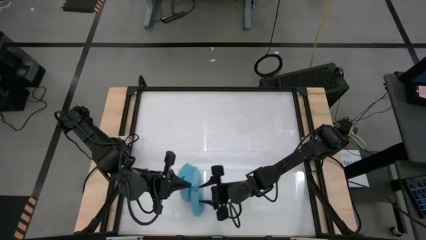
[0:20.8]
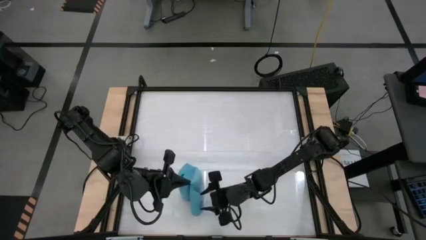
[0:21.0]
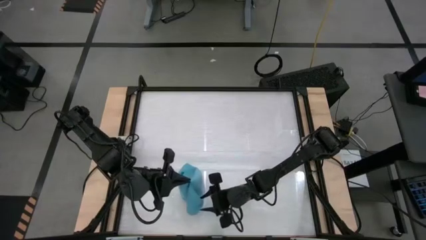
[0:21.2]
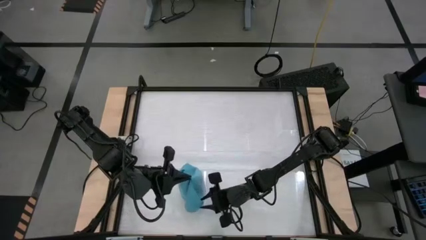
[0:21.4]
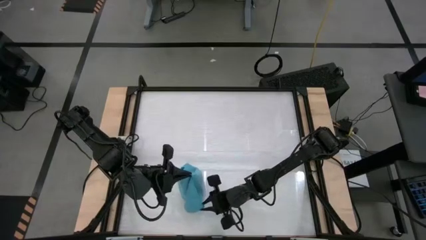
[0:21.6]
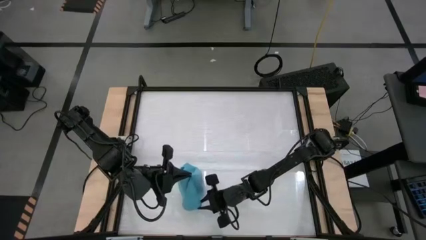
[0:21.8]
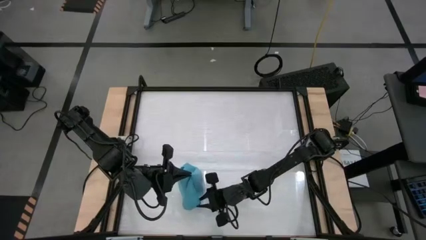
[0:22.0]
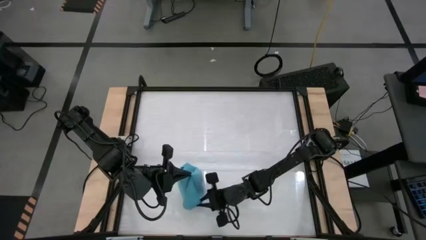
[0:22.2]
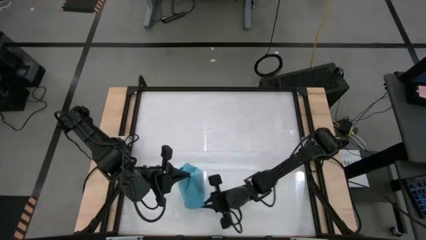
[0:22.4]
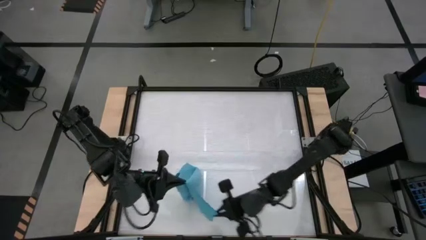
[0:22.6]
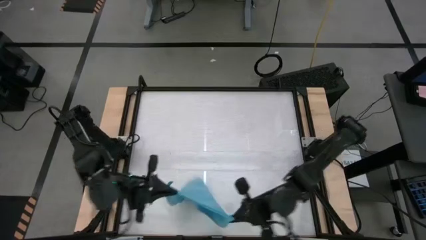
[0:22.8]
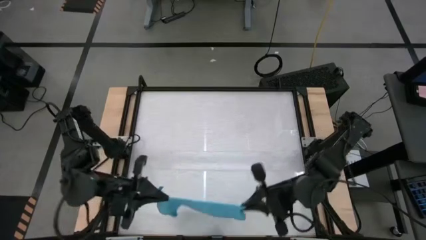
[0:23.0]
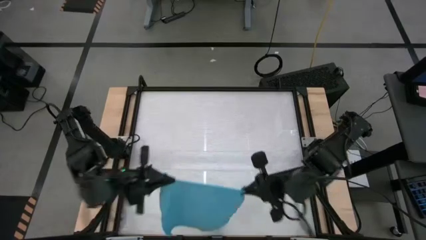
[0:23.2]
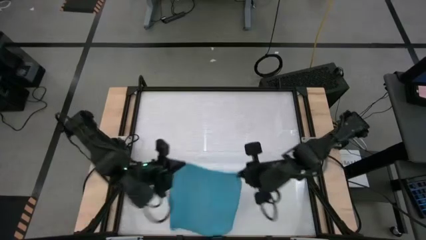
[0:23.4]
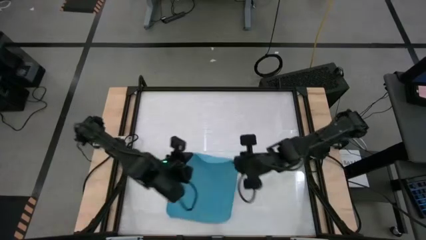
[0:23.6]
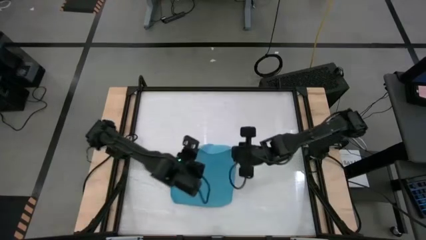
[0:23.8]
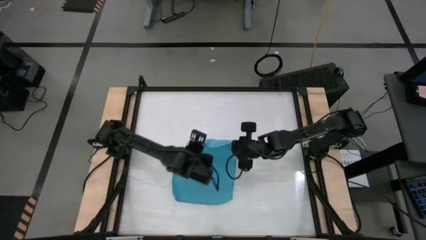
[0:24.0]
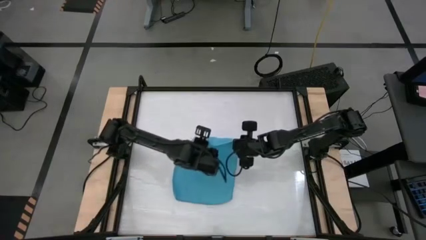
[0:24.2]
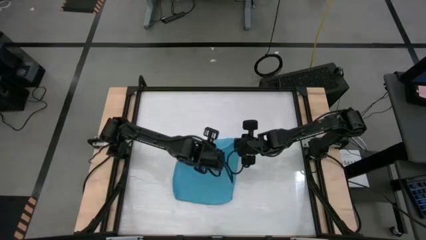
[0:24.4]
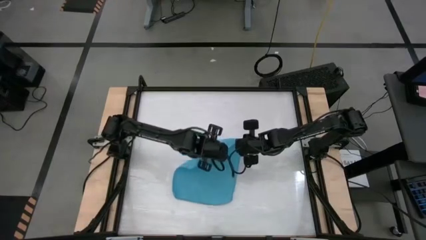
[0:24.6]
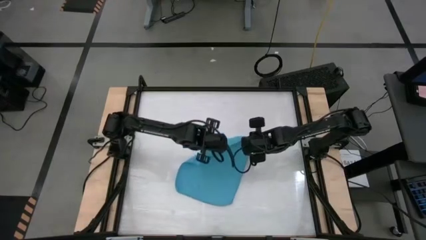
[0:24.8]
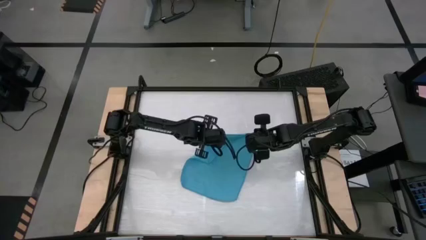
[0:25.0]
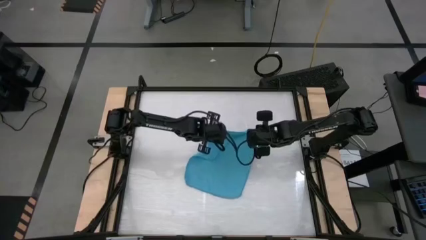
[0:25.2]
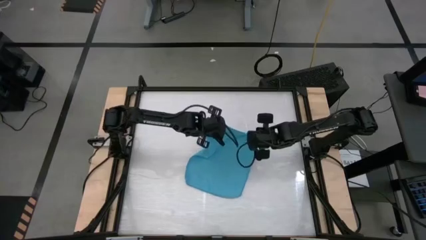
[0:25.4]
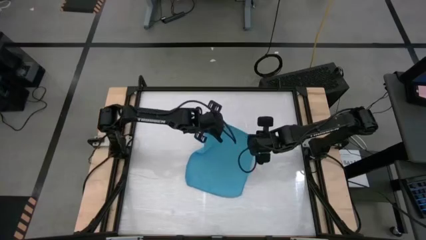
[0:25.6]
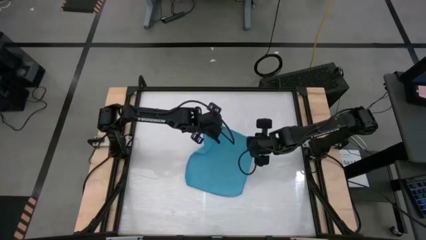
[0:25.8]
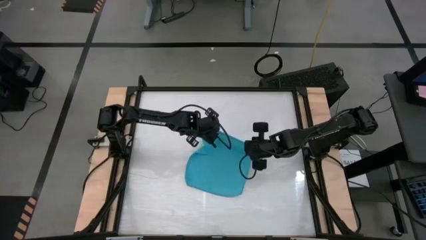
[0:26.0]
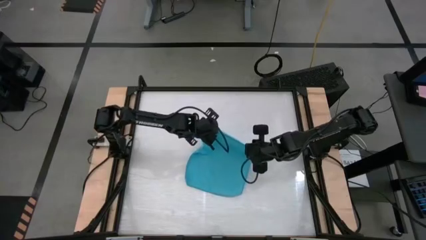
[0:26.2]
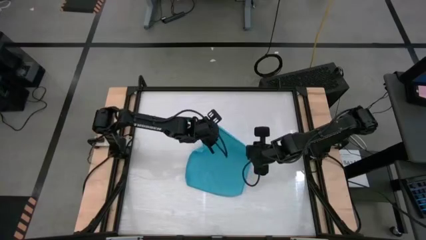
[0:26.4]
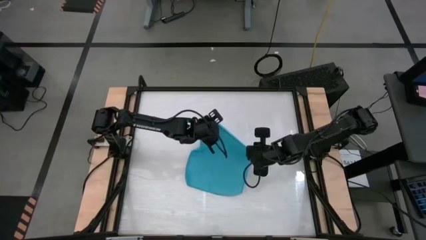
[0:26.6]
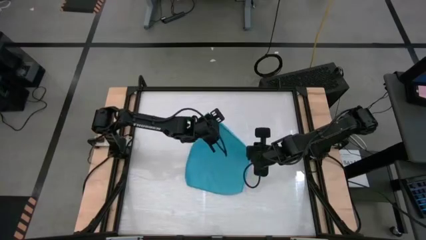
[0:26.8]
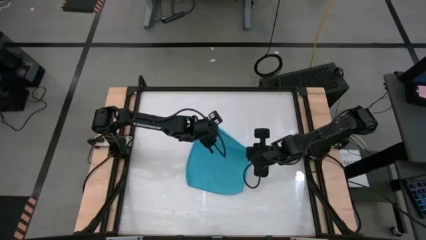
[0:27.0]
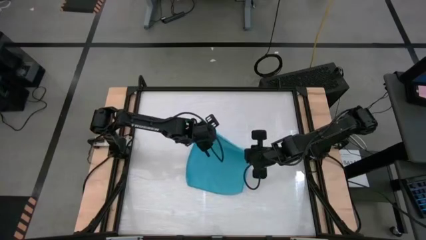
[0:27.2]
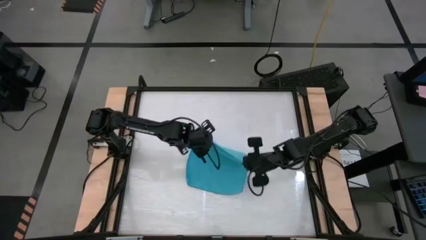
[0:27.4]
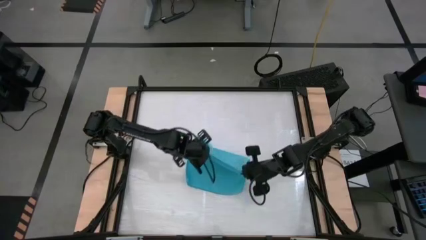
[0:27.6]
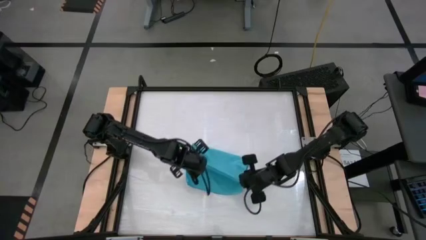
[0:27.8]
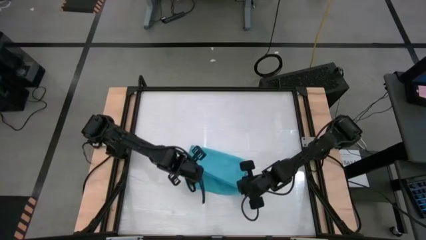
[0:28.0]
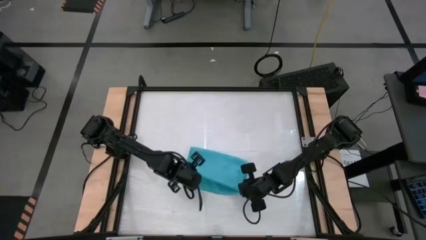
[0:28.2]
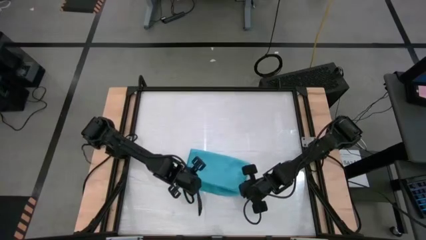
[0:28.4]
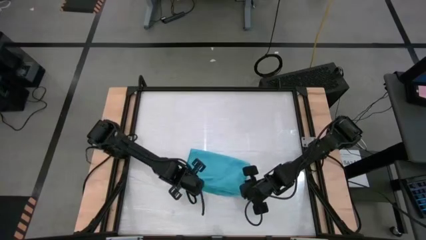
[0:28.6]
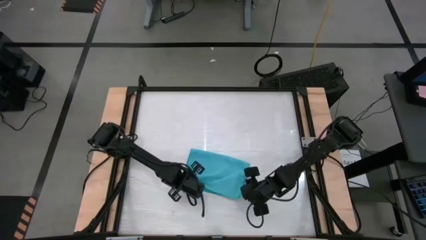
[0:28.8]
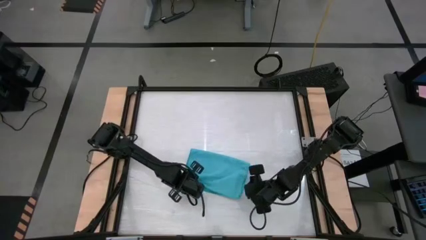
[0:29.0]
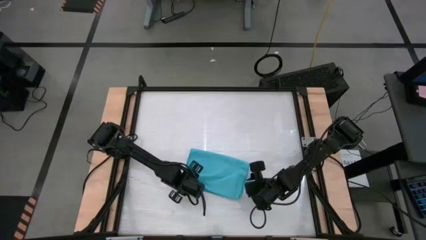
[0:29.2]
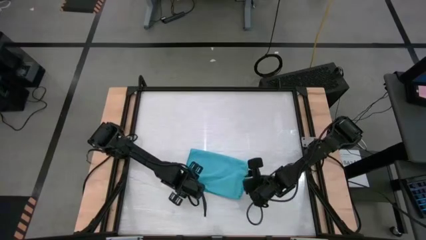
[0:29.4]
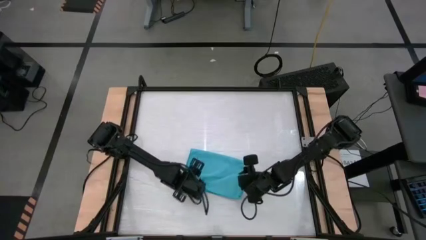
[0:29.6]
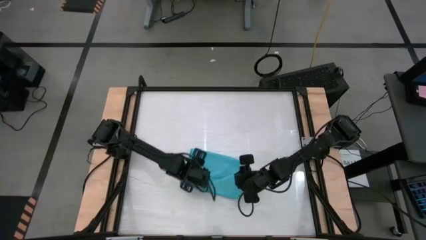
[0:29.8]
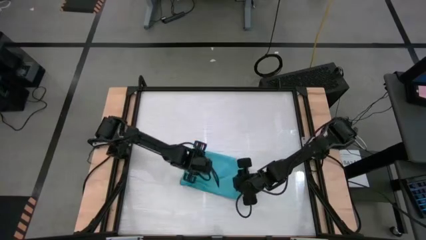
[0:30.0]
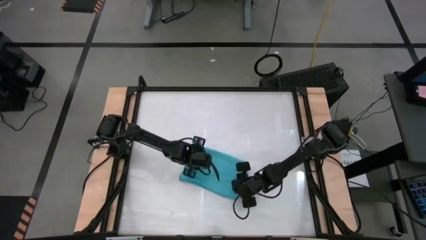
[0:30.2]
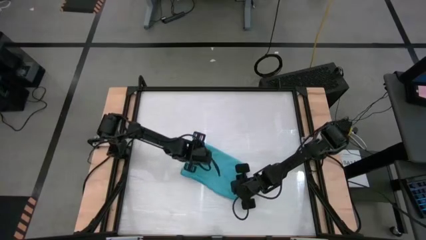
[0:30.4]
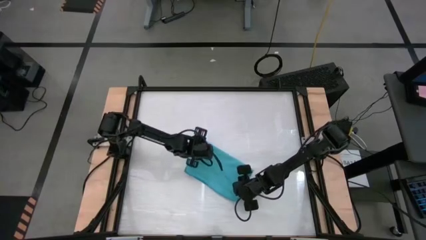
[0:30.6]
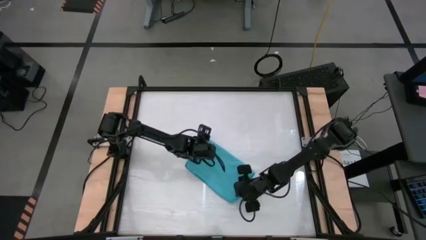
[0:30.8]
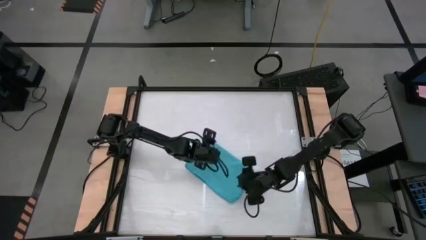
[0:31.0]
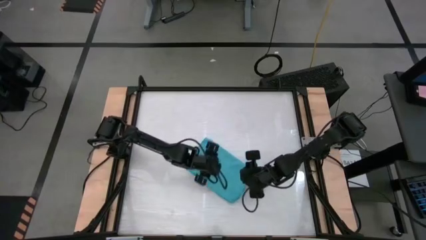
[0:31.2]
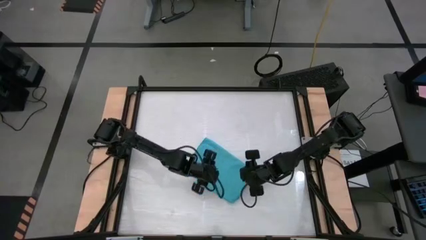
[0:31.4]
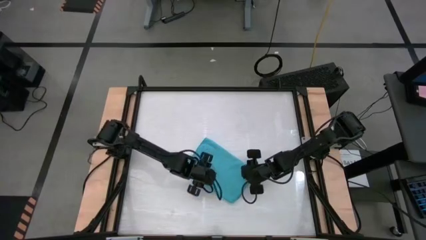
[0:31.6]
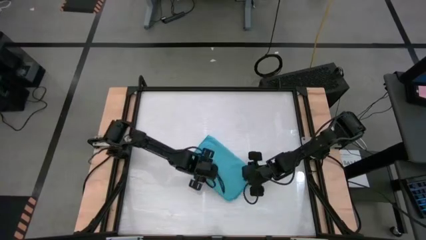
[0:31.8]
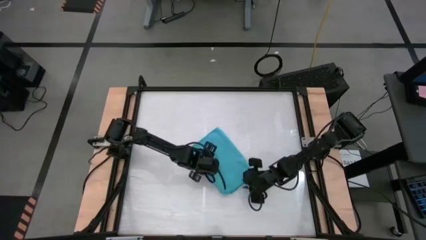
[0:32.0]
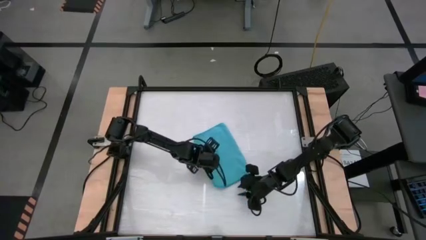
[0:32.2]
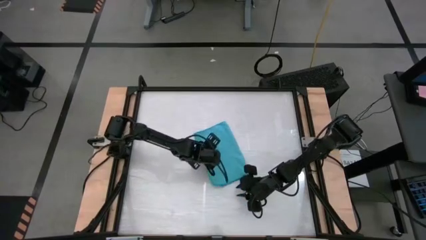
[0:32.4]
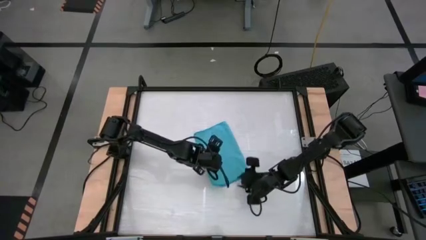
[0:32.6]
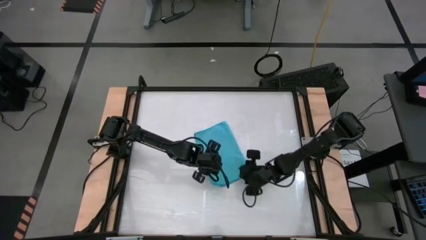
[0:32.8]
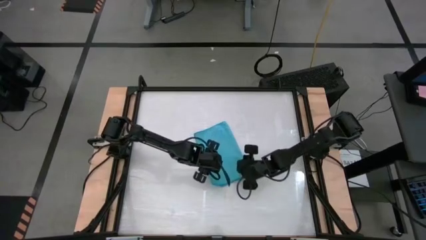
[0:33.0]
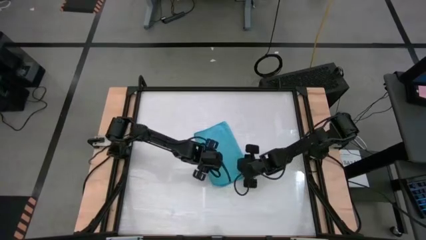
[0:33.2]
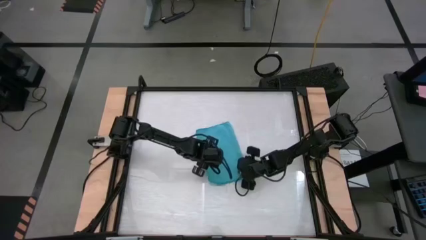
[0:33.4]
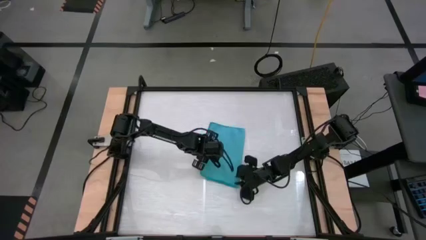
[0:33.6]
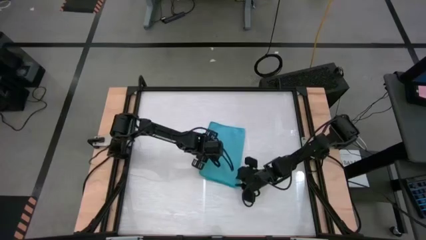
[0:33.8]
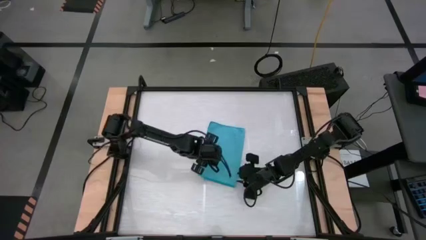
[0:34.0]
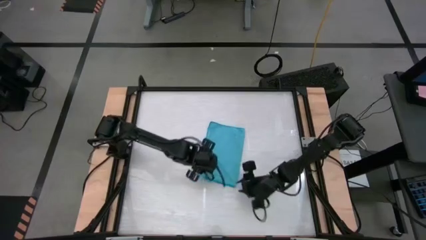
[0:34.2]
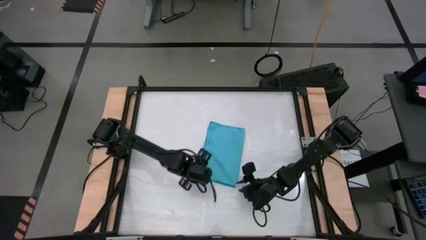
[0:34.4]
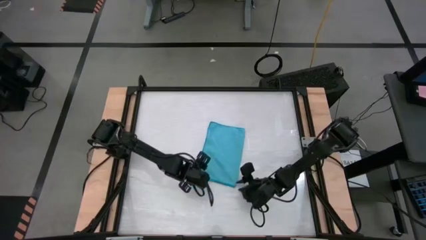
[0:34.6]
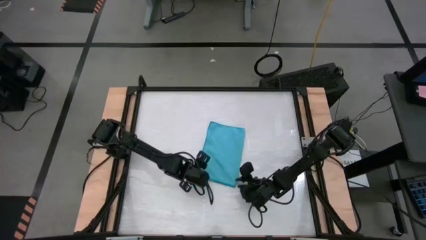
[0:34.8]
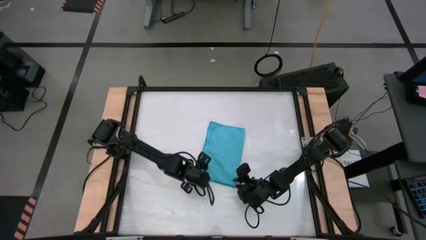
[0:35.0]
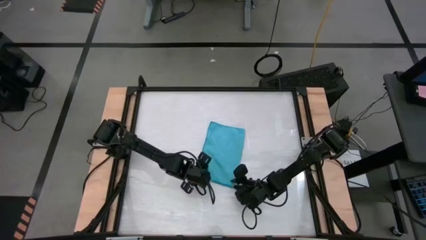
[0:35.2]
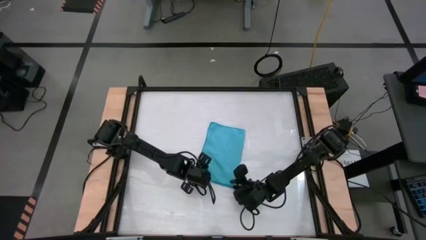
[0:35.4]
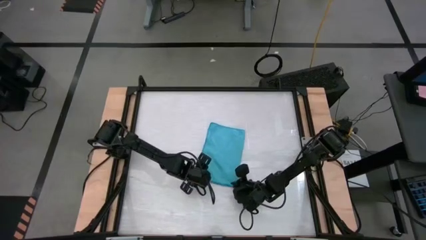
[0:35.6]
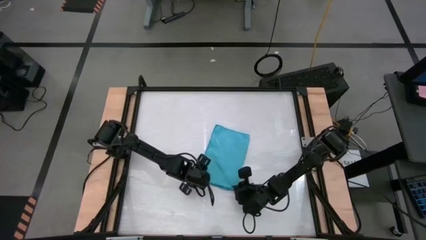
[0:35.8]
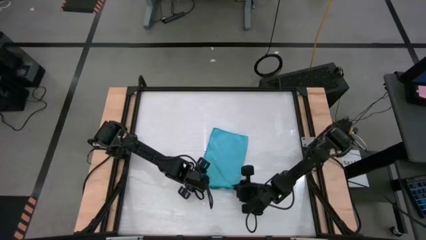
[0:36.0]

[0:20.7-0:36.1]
Task: Roll towel
Roll the blue microfiber towel
